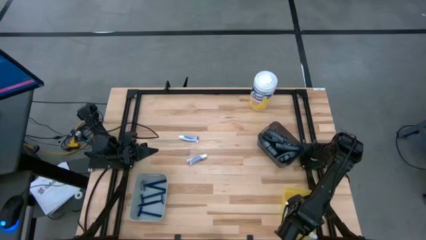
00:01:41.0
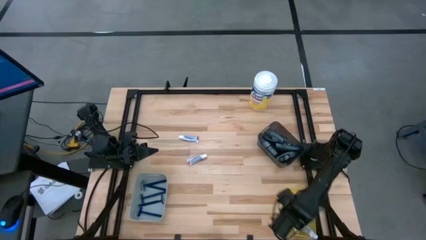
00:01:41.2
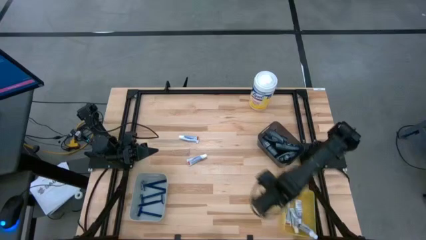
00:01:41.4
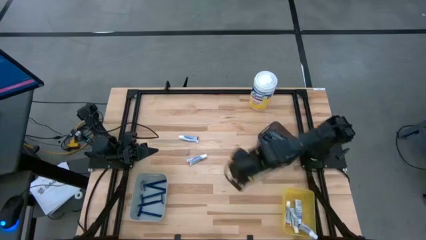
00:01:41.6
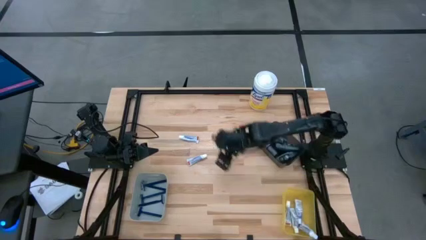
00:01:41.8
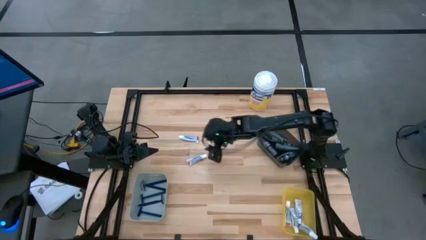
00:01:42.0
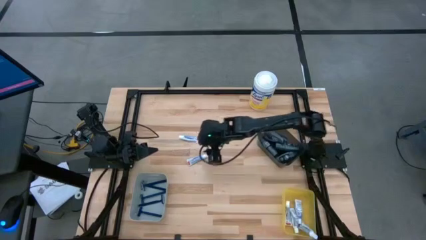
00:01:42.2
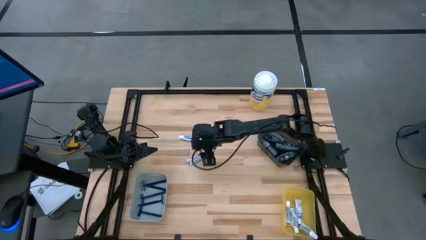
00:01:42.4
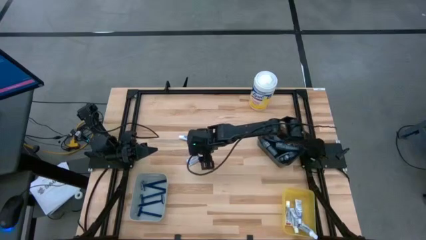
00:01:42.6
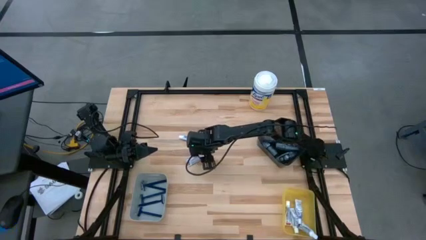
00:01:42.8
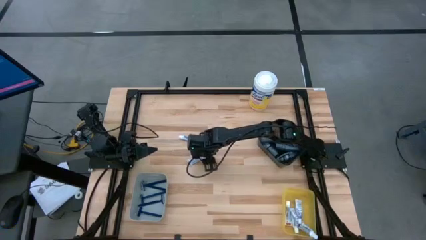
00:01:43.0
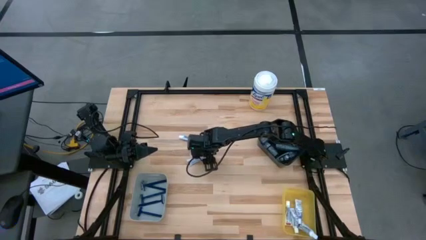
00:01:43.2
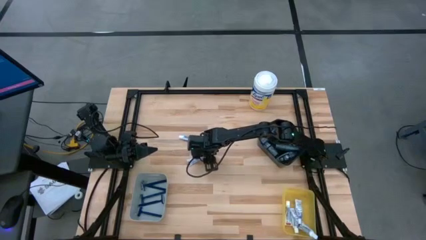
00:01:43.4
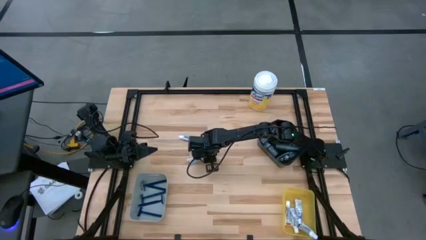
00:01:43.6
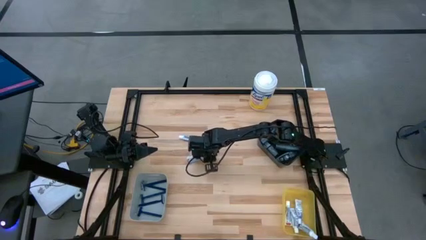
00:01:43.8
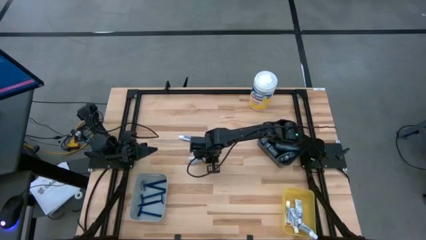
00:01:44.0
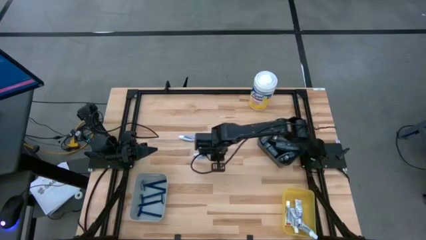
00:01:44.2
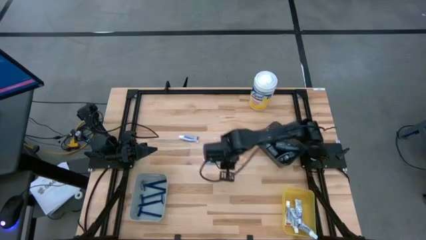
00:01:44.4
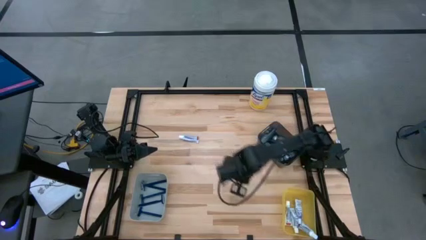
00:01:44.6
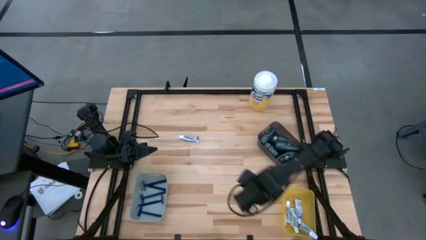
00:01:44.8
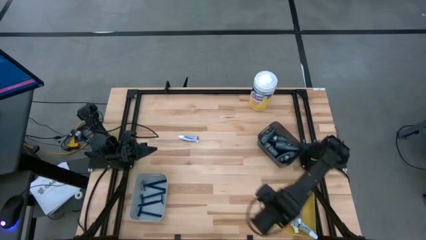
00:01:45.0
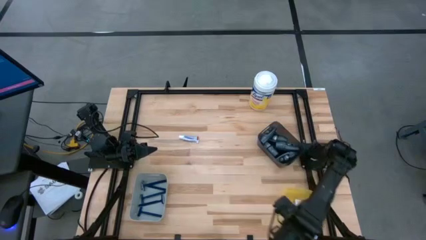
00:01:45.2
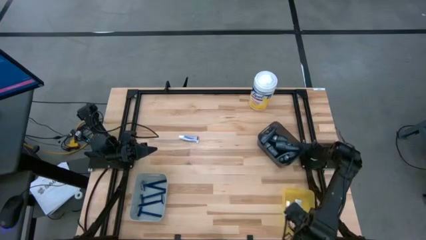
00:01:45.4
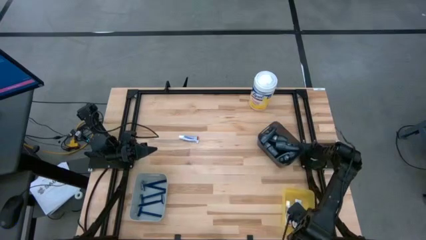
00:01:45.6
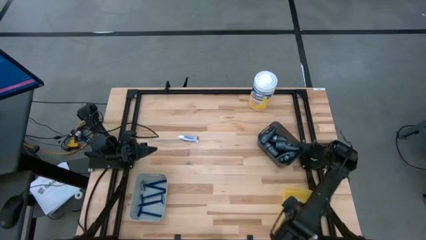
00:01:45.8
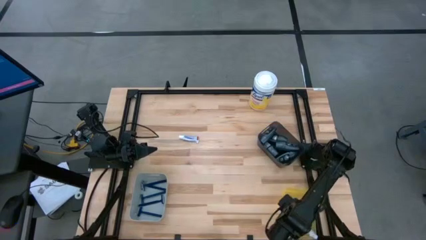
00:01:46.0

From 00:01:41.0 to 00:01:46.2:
Task: Pick & Place Travel size toiletries
Put the white toothpaste tube into the yellow bin

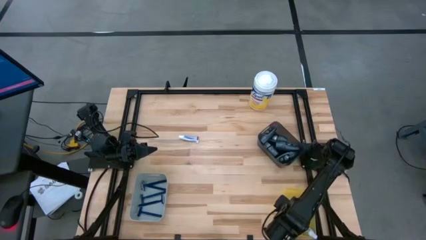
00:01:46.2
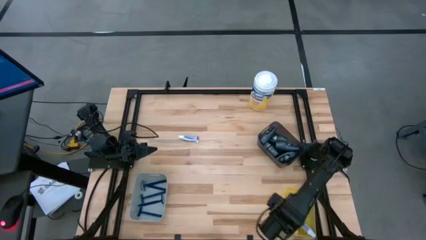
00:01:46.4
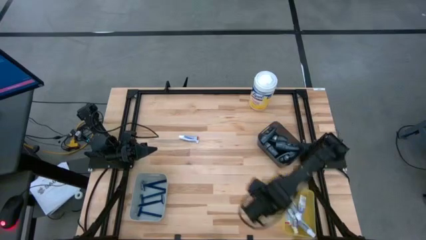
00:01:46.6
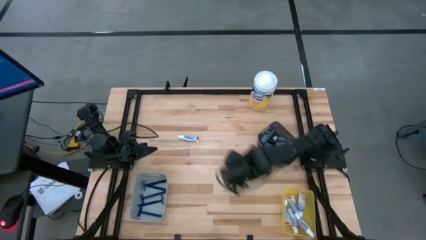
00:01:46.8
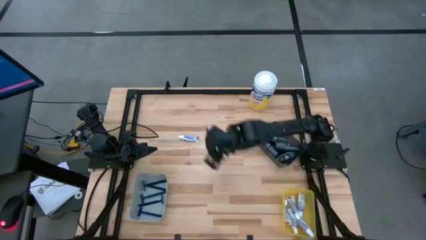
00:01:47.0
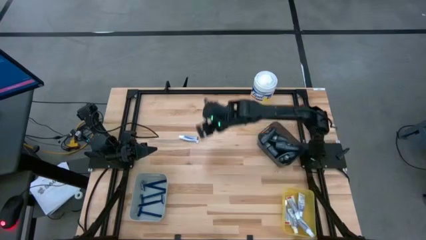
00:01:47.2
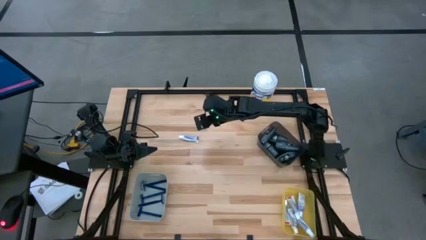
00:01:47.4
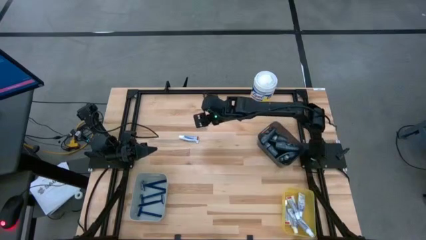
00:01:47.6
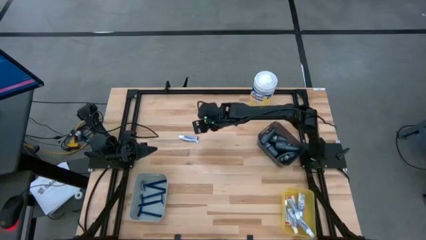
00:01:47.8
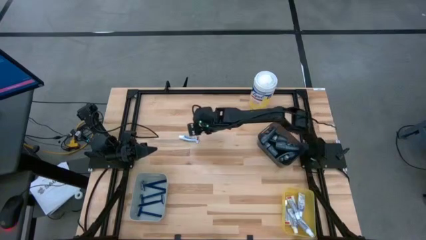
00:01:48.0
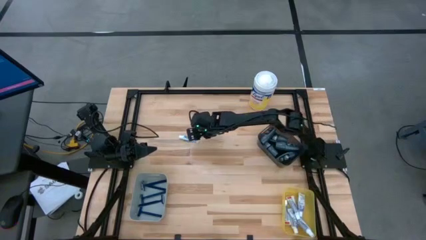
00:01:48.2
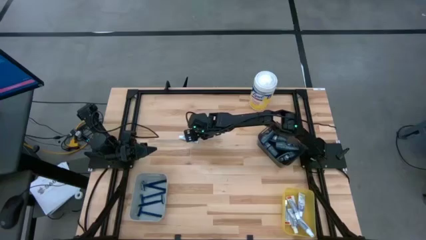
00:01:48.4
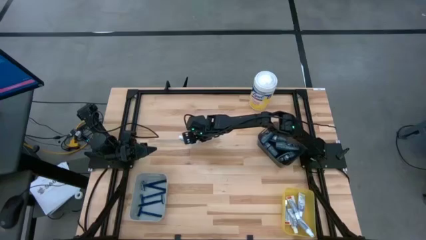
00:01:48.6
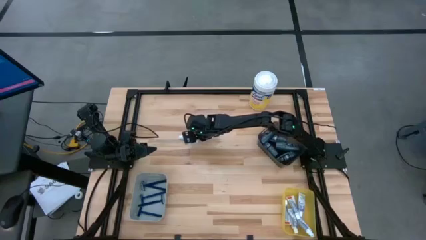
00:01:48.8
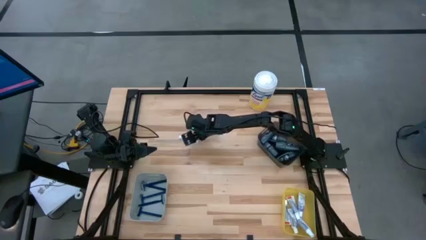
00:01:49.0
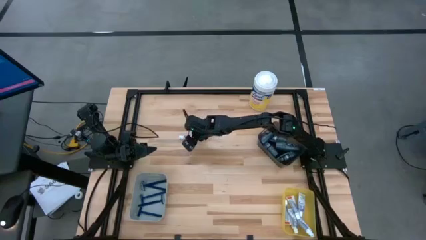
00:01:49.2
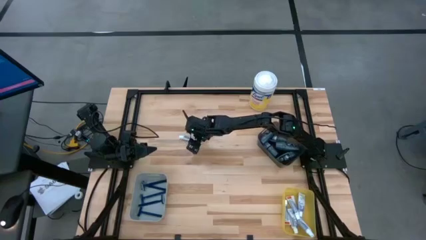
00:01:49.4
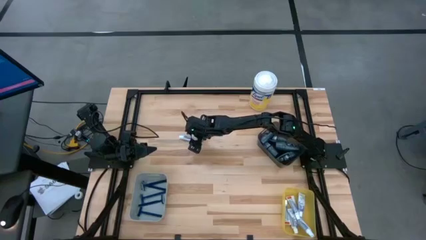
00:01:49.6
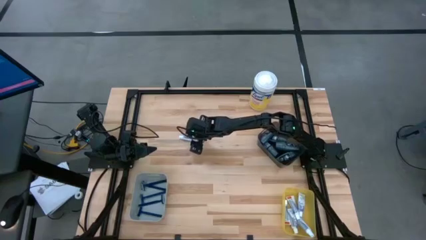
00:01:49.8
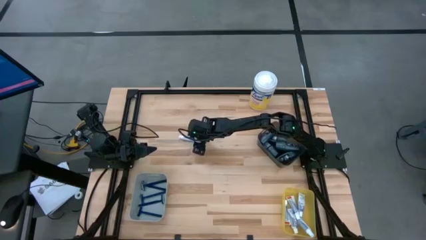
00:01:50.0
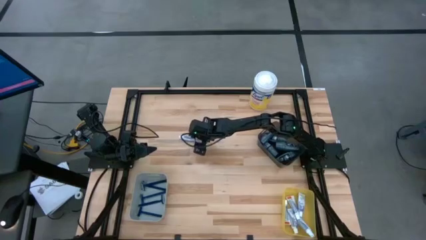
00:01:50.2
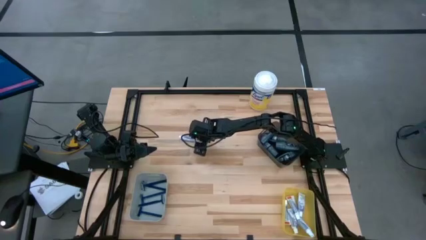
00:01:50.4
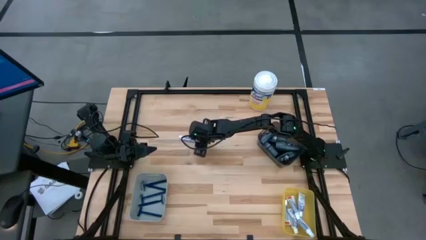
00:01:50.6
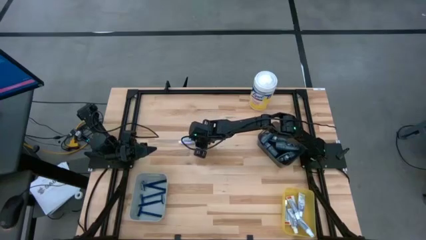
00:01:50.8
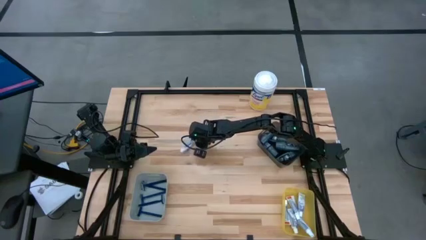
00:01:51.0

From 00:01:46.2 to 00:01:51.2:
Put the white toothpaste tube into the yellow bin

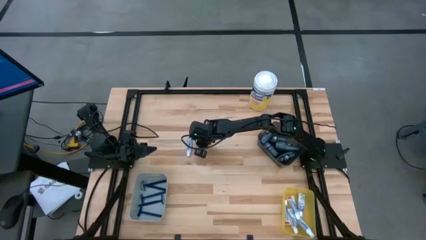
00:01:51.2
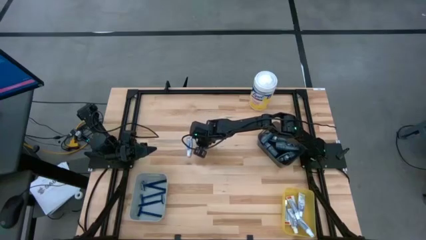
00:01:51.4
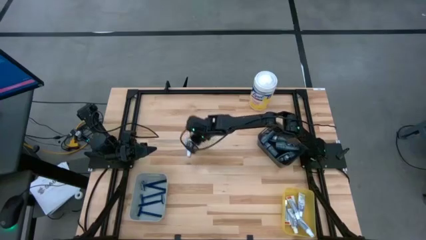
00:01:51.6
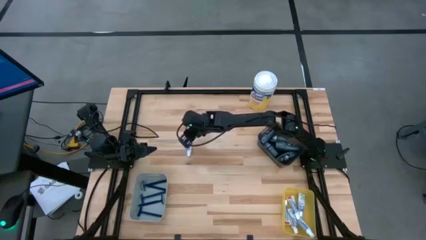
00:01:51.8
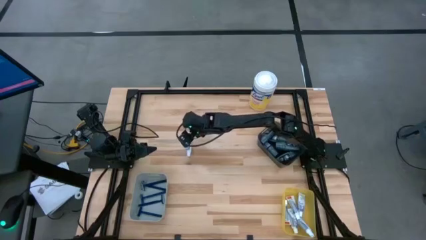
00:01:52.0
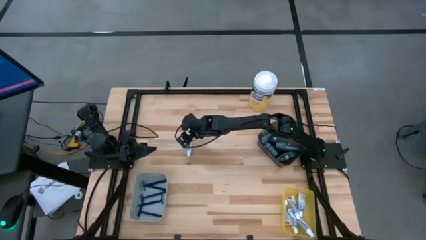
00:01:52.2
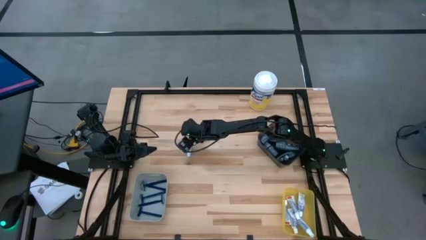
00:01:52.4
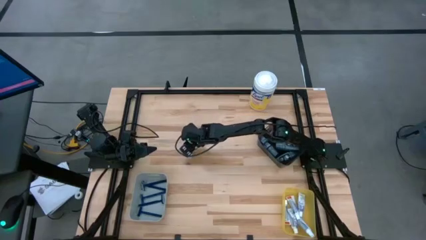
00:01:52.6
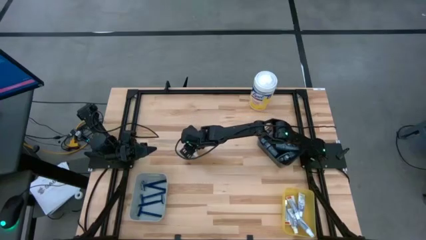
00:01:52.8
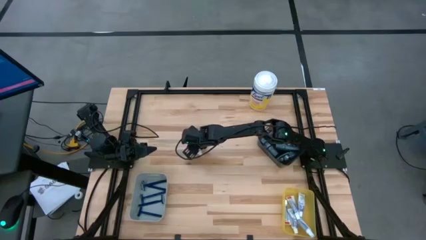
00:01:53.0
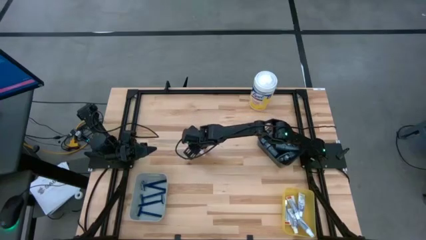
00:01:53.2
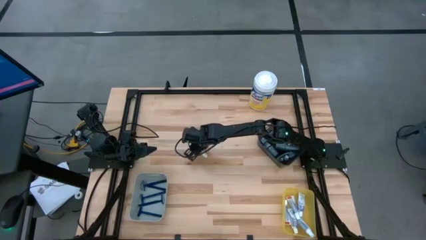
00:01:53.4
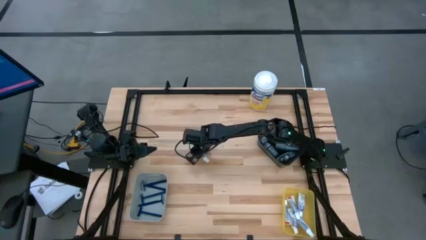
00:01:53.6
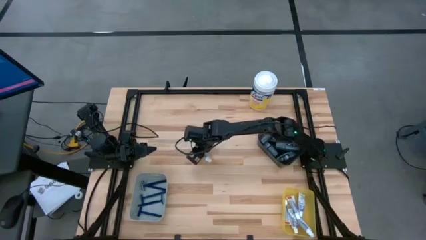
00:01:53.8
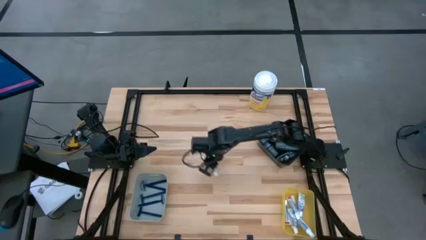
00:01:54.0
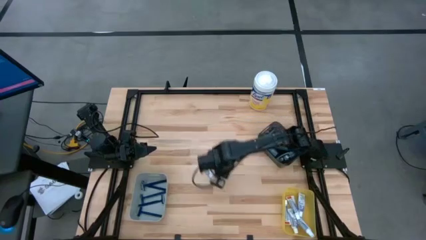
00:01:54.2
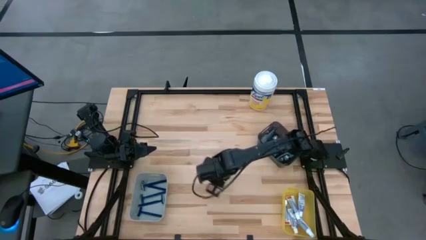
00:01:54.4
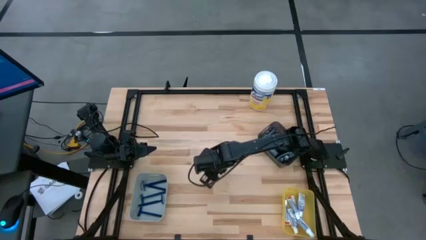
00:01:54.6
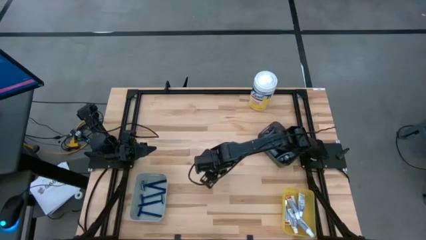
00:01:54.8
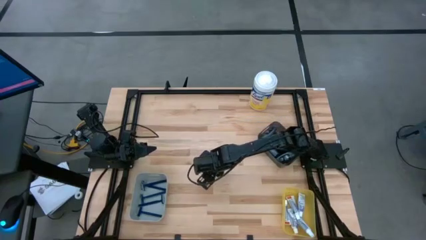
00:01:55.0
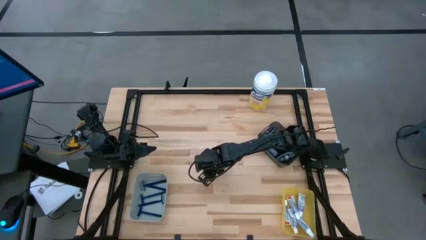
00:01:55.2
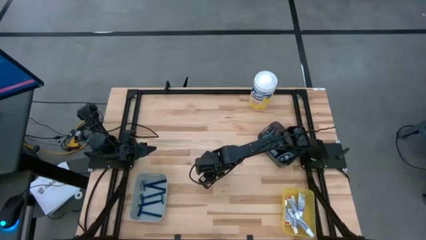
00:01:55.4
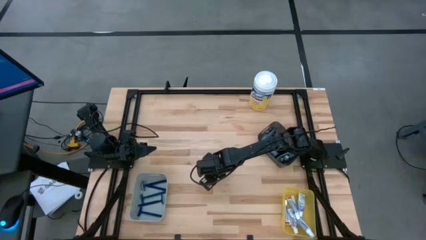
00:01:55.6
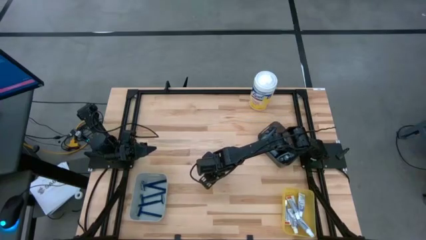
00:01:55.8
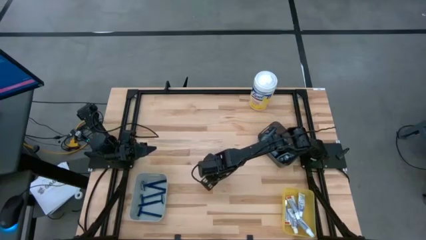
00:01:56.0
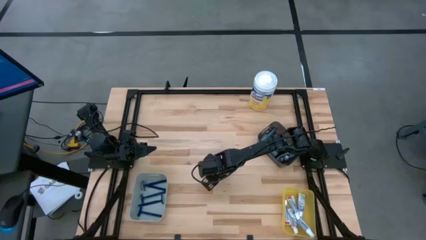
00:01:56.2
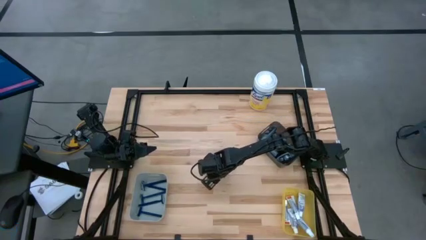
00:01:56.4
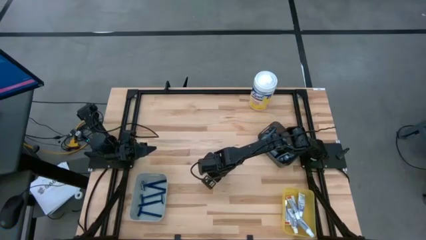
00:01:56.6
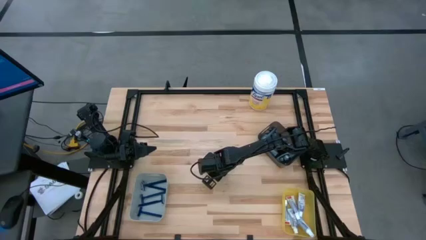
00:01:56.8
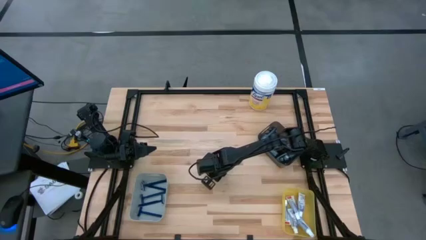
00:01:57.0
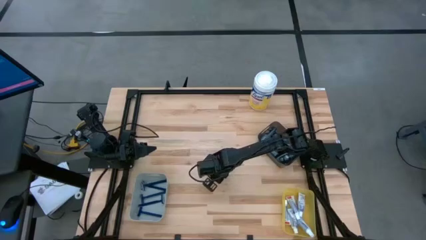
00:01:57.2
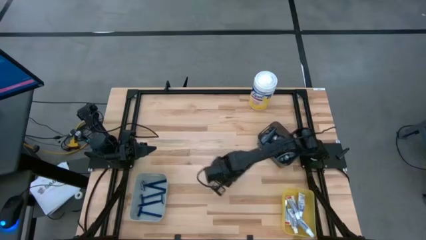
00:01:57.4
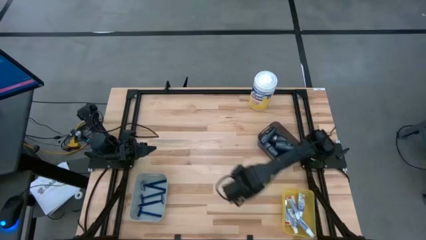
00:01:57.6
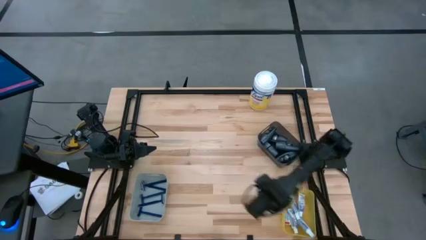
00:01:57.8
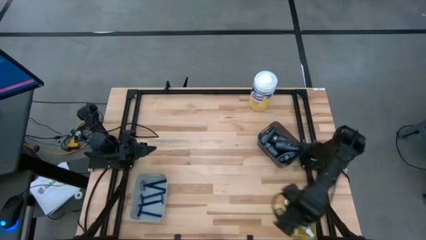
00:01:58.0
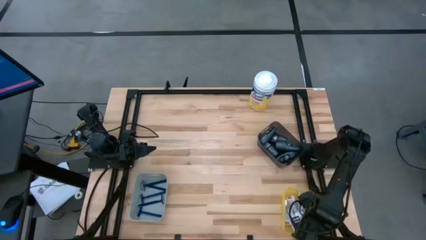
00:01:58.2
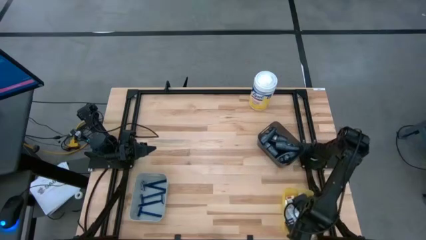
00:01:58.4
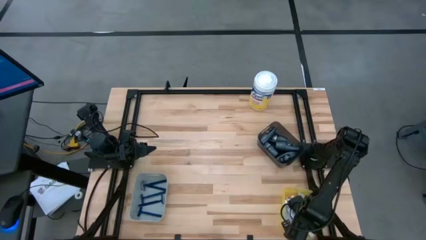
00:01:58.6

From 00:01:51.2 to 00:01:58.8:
Put the white toothpaste tube into the yellow bin
